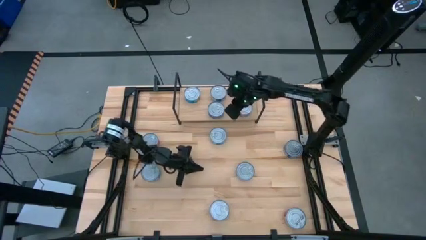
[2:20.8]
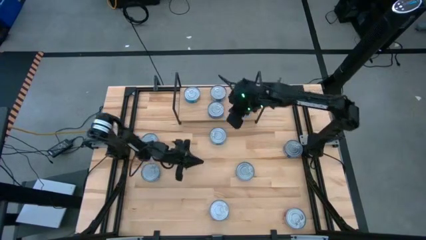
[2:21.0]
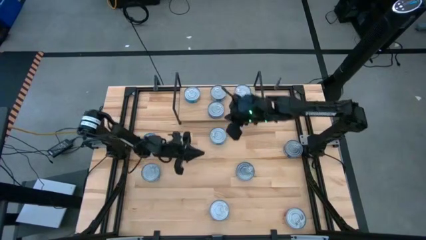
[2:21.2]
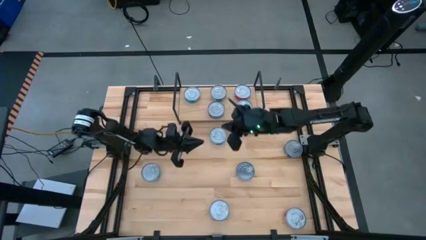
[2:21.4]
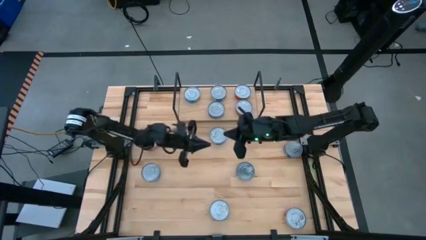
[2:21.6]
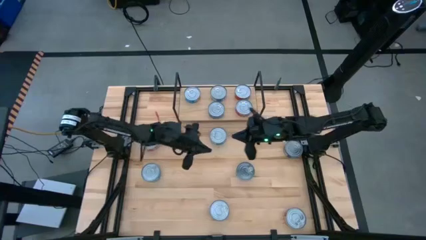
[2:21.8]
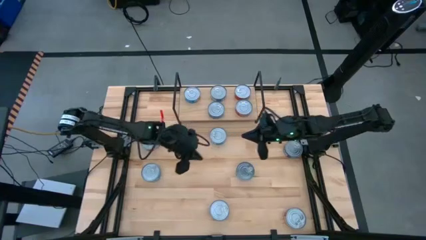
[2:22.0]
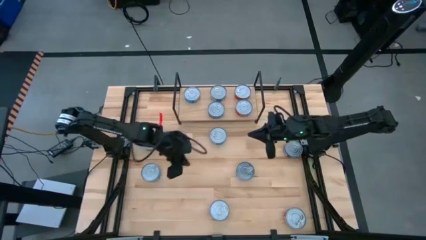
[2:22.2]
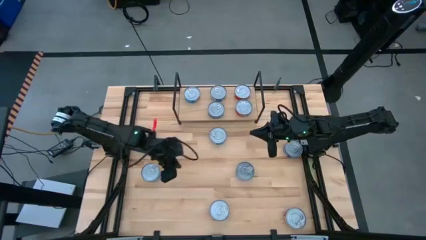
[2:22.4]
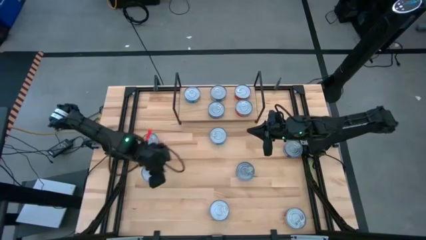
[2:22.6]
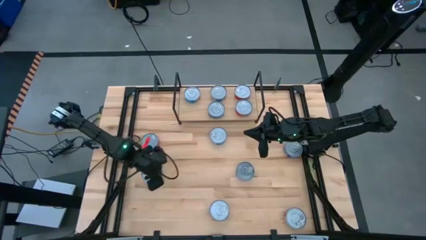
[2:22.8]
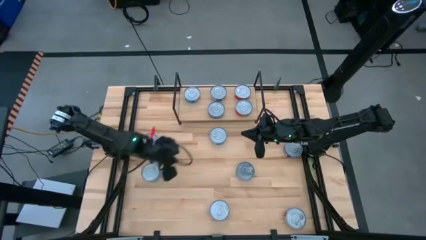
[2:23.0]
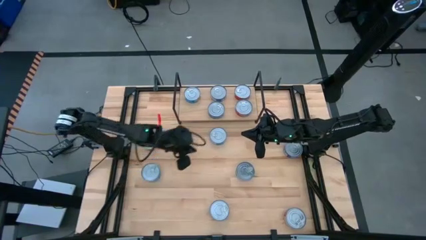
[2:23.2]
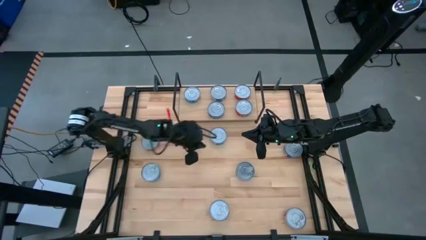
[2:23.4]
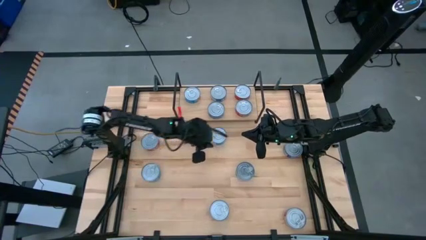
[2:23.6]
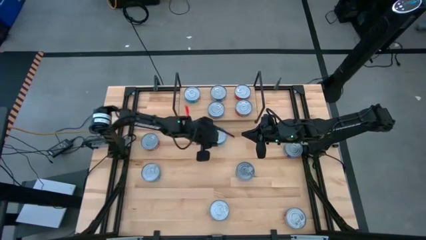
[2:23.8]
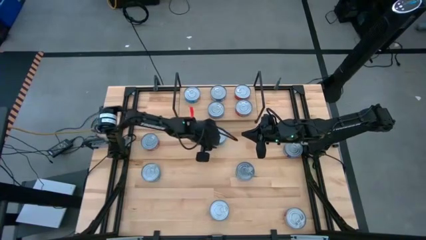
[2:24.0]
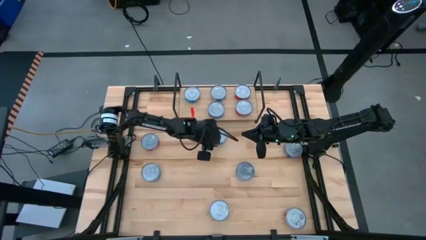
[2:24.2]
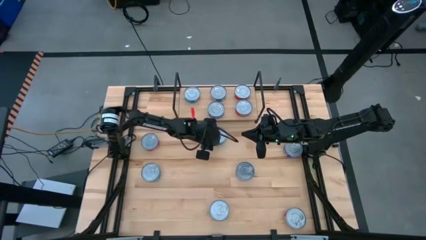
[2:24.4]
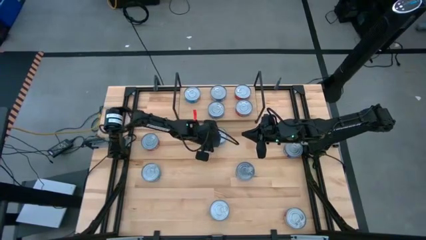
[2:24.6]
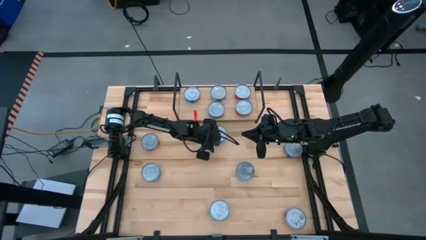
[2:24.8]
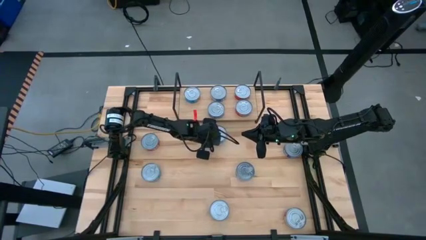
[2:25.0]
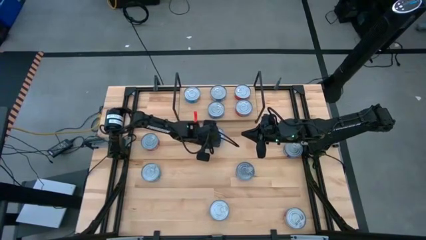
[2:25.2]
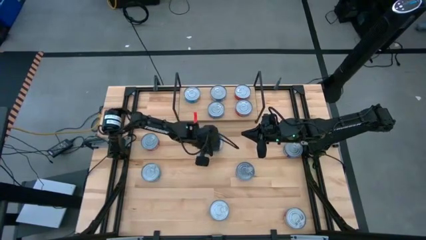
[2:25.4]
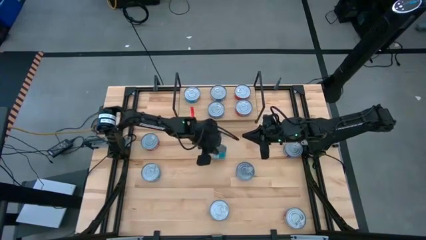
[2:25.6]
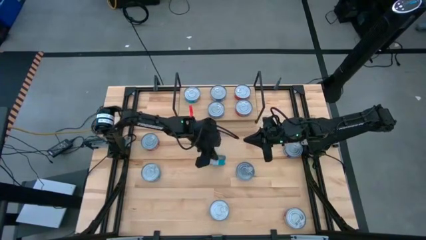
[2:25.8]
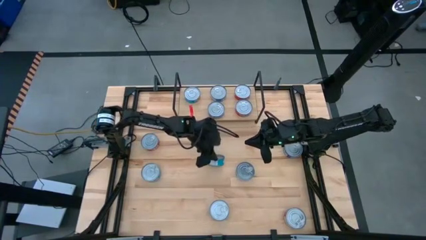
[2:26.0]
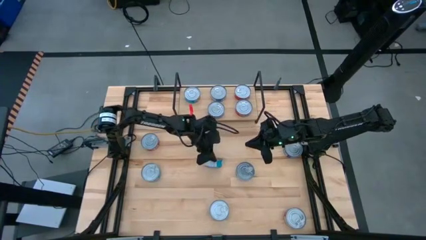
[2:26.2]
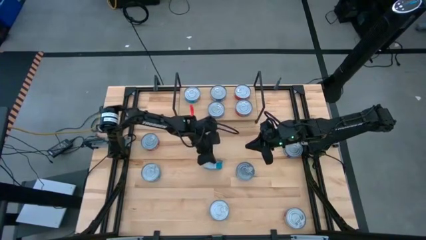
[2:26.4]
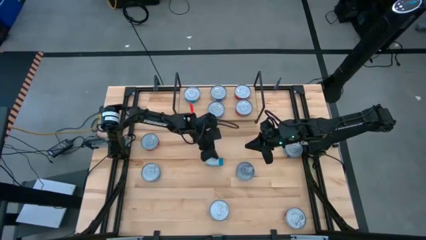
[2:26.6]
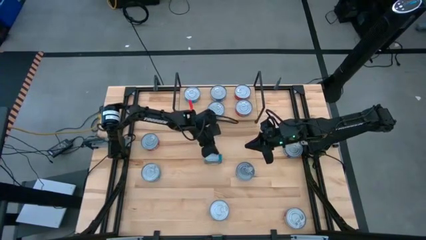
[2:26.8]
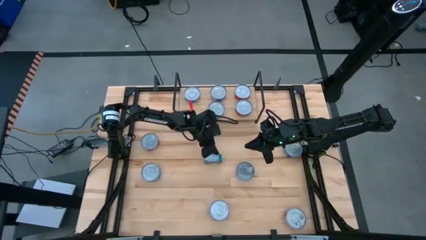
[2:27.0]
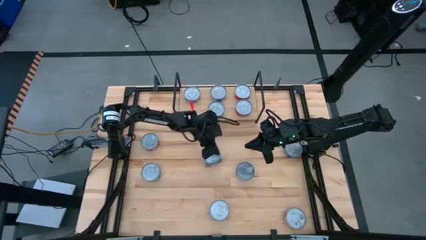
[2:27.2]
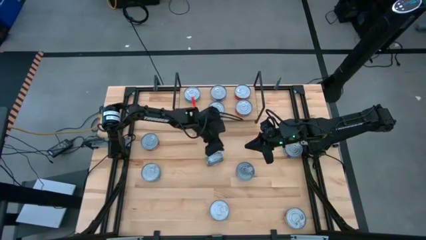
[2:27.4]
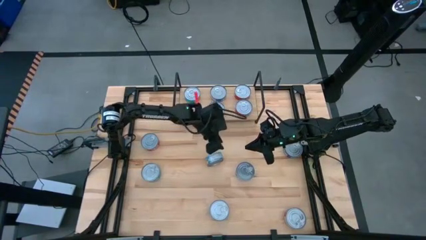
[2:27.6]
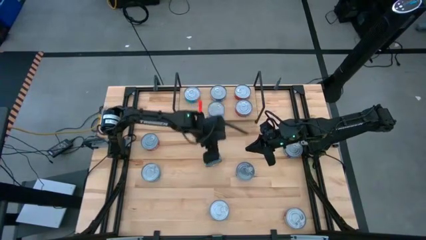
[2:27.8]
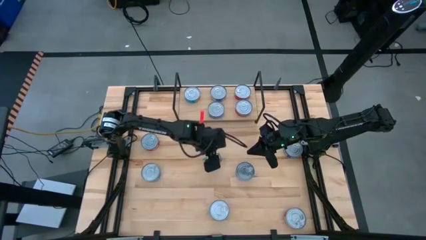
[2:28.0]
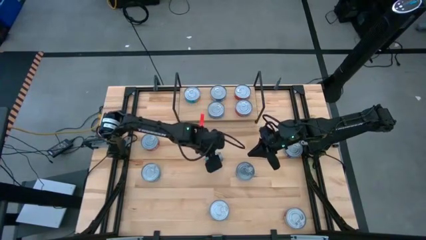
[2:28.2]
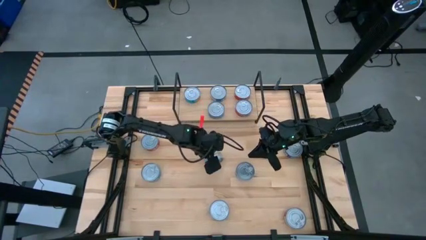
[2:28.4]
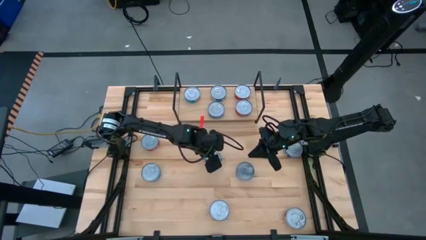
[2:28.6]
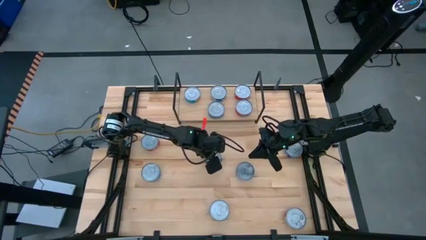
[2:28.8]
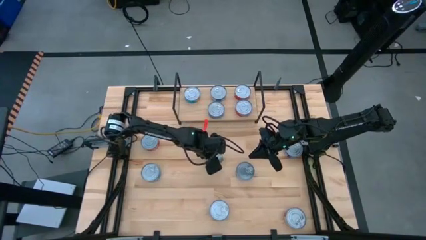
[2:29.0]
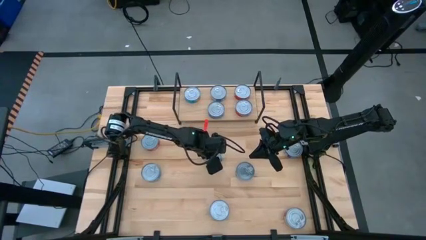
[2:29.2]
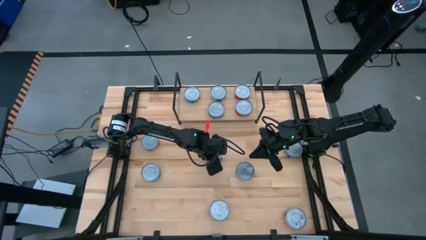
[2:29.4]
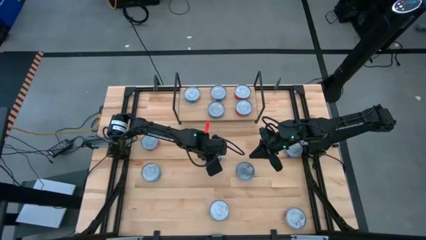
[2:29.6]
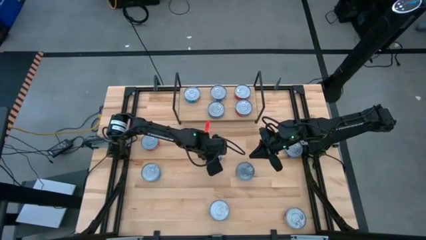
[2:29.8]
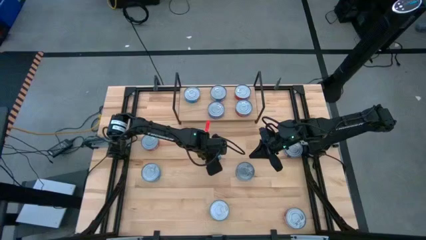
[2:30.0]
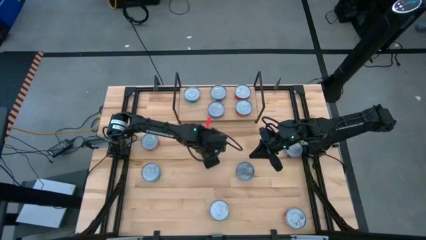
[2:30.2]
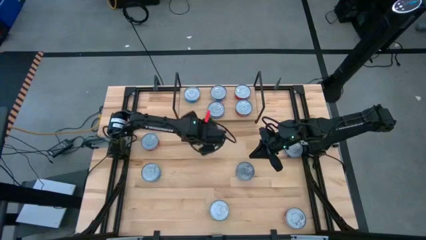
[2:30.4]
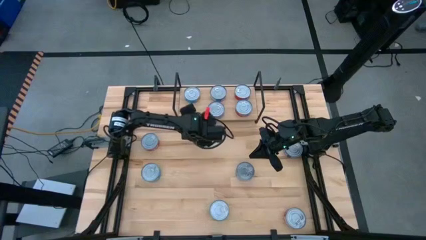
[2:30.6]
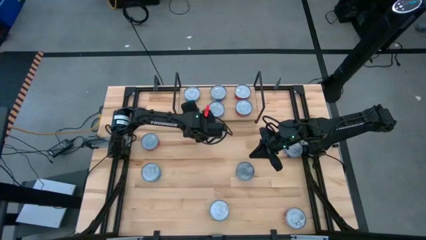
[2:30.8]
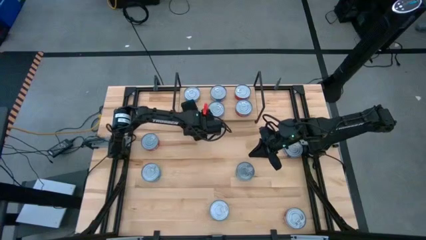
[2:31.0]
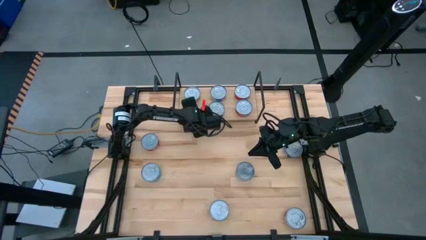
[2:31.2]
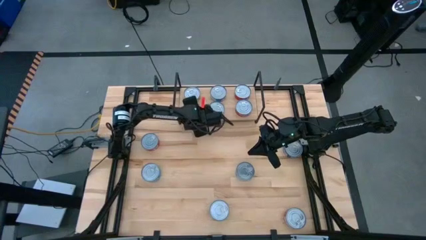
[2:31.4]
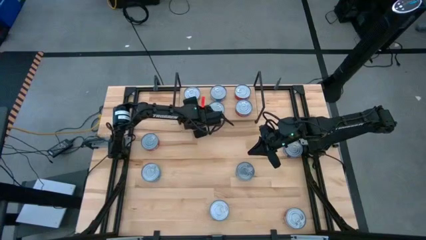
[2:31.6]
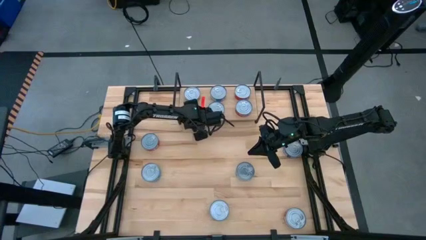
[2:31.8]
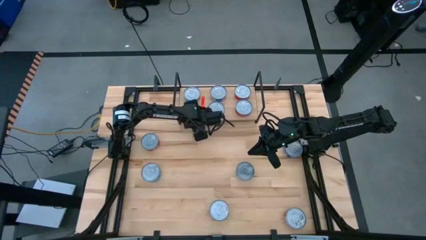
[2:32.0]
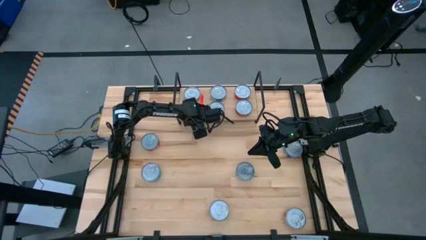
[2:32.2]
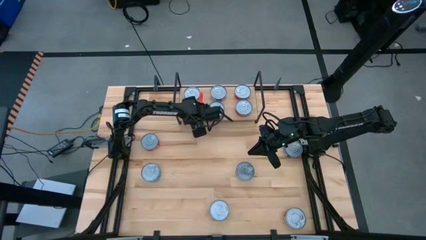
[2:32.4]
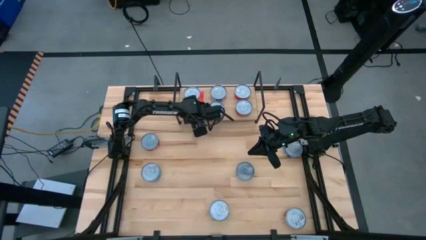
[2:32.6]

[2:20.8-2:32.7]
Task: Stack canned seafood by type on shelf
Put the top middle light blue tuna can on the shelf aligned with the other light blue tuna can

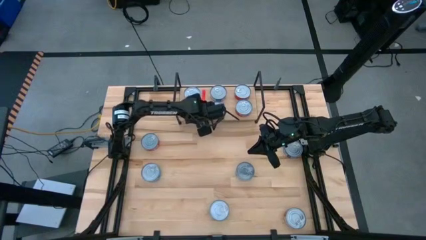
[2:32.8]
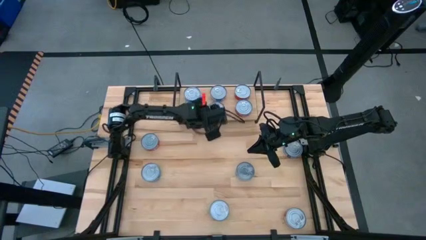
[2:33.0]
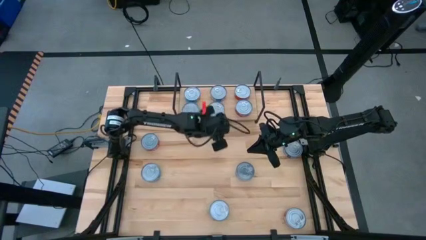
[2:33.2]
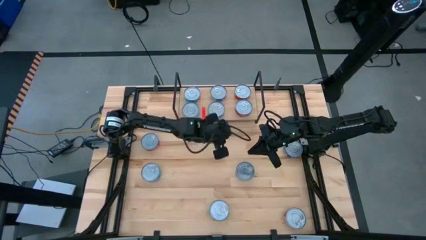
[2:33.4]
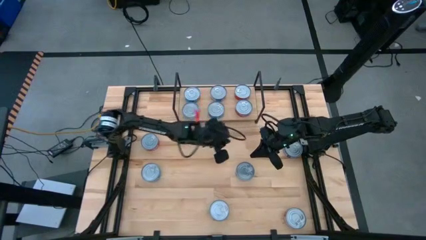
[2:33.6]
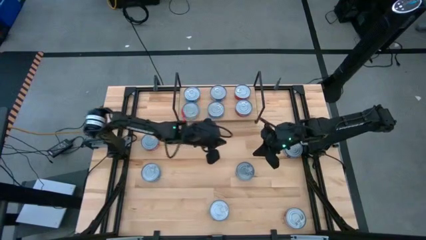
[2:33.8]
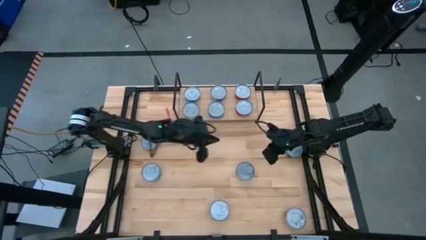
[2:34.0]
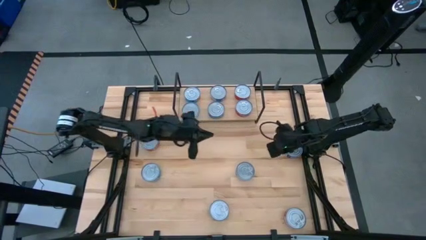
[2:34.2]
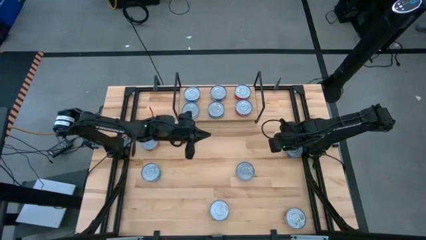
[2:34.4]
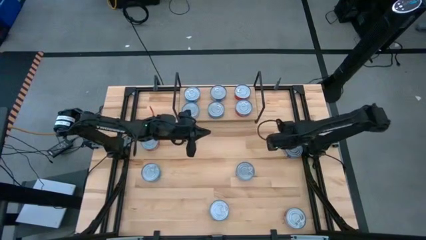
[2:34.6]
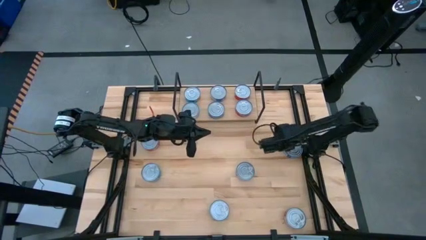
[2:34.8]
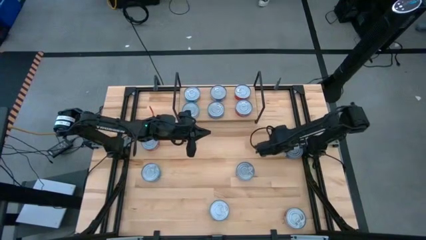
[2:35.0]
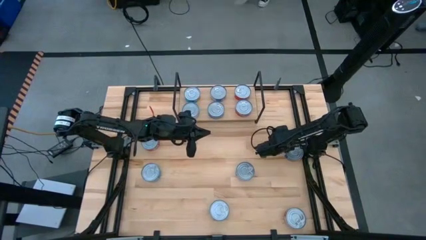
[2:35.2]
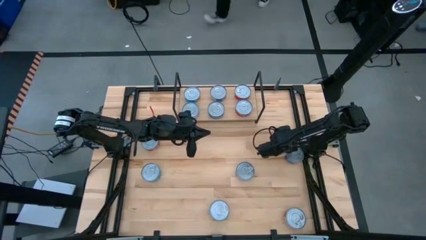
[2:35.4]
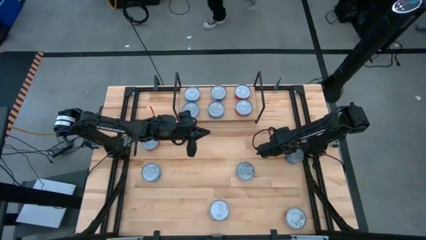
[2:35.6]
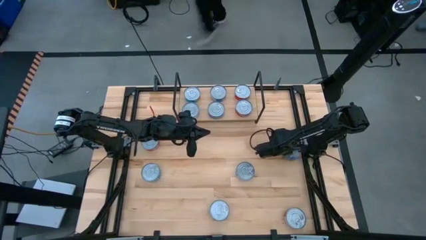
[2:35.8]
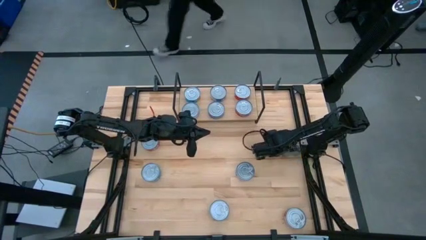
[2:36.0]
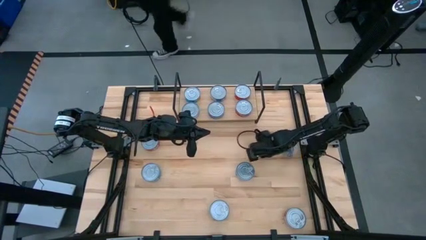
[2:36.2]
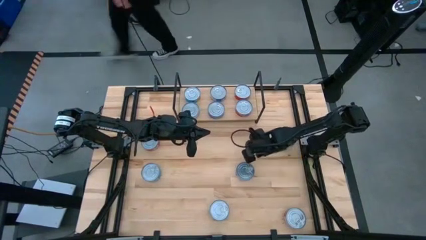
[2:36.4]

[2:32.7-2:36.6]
Move the middle right blue tuna can to the center of the table
